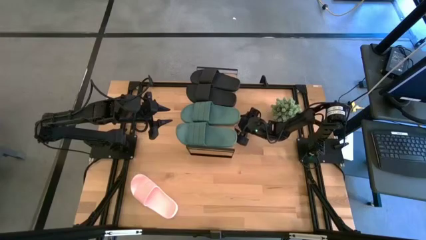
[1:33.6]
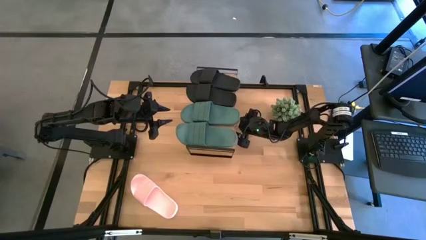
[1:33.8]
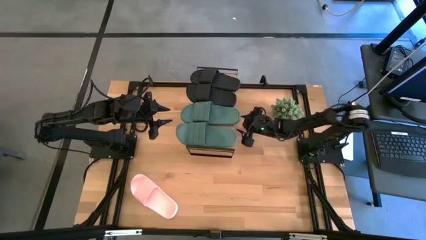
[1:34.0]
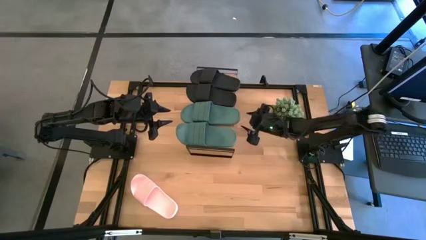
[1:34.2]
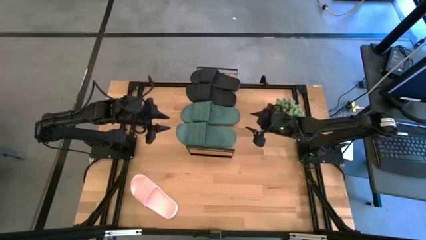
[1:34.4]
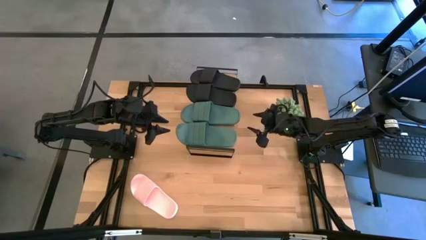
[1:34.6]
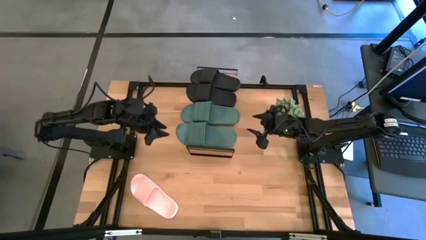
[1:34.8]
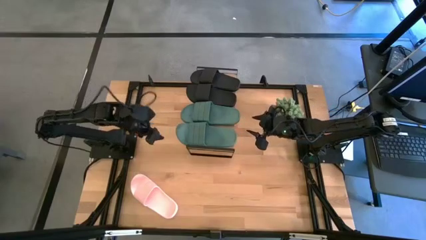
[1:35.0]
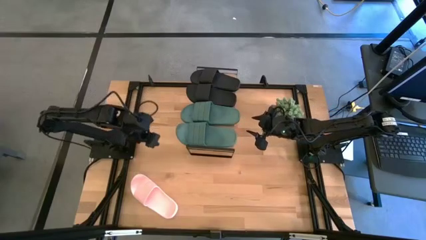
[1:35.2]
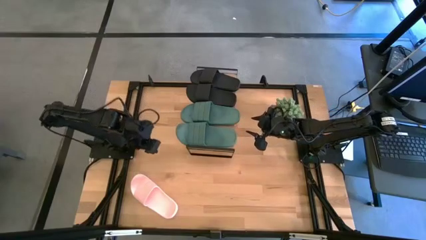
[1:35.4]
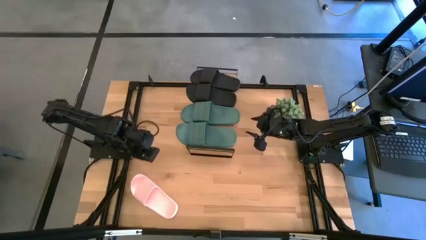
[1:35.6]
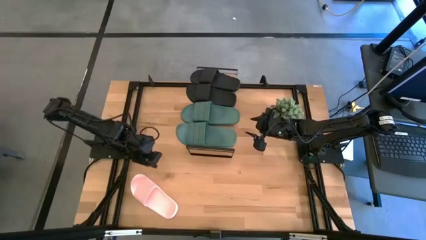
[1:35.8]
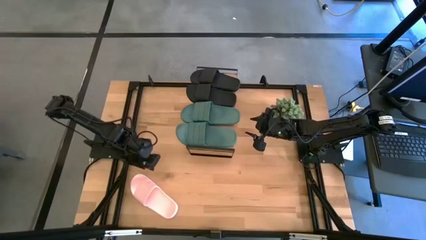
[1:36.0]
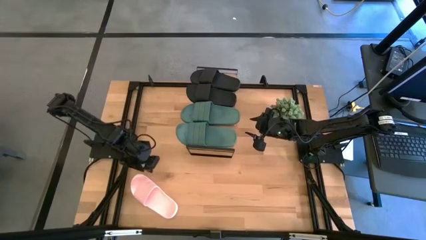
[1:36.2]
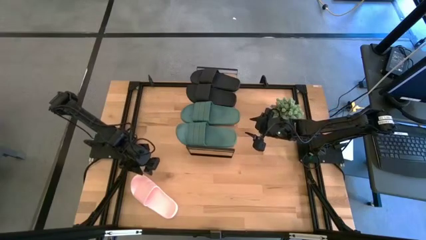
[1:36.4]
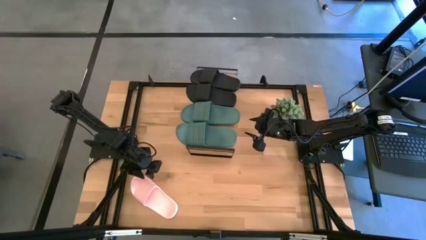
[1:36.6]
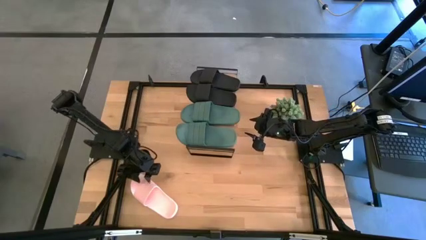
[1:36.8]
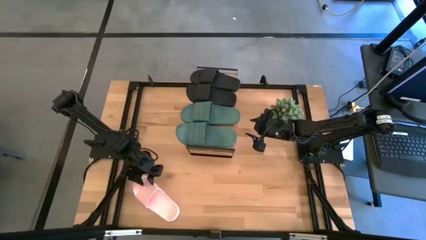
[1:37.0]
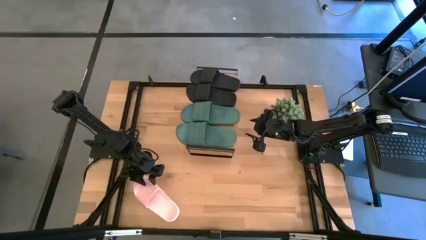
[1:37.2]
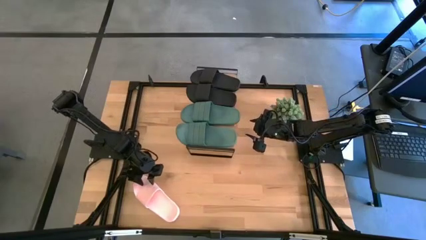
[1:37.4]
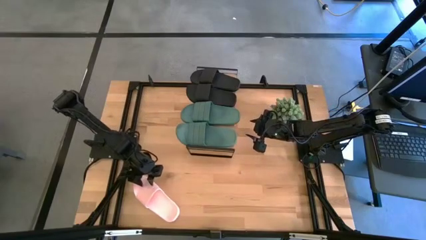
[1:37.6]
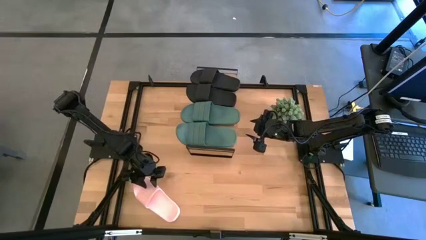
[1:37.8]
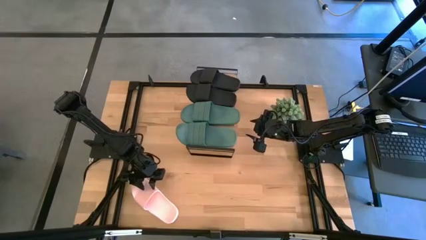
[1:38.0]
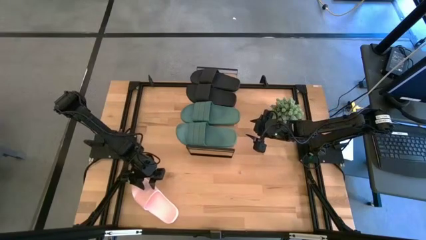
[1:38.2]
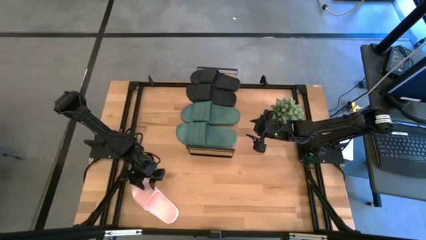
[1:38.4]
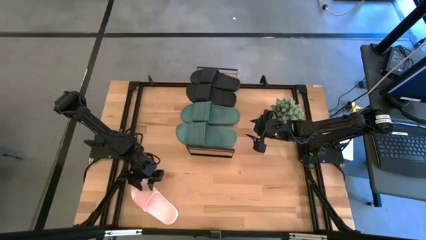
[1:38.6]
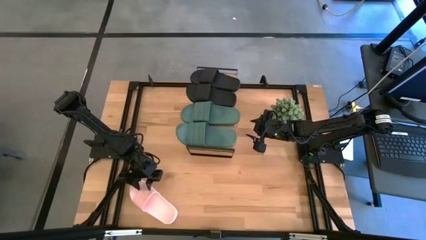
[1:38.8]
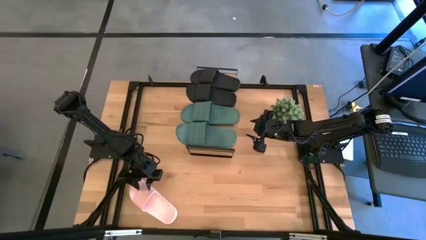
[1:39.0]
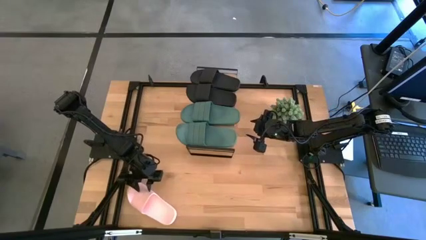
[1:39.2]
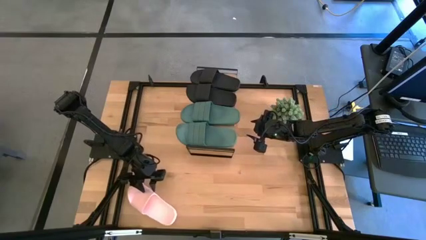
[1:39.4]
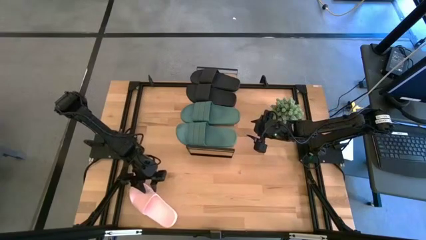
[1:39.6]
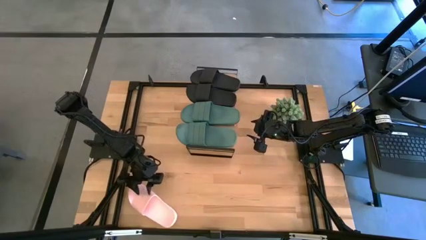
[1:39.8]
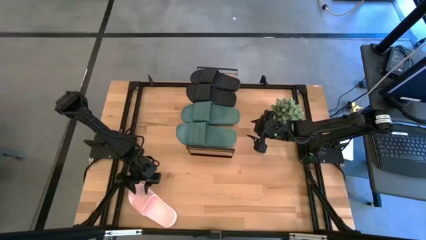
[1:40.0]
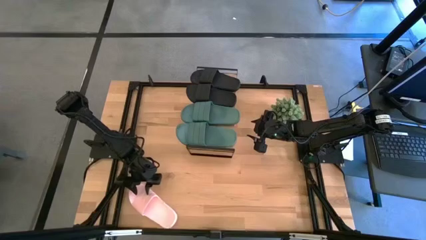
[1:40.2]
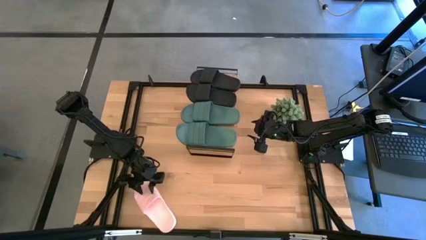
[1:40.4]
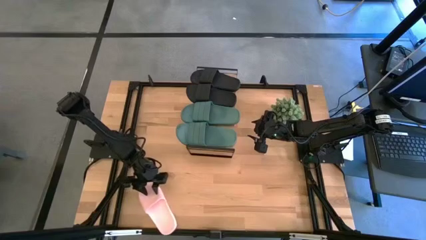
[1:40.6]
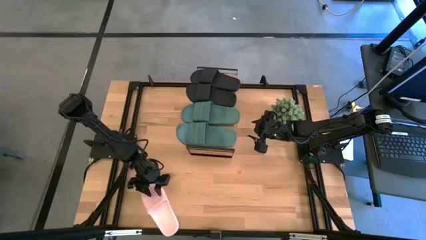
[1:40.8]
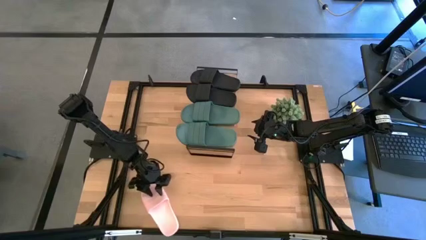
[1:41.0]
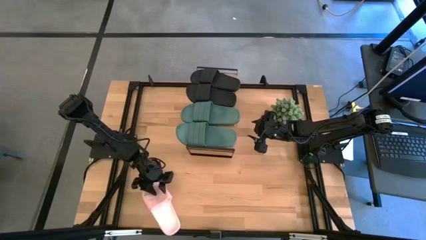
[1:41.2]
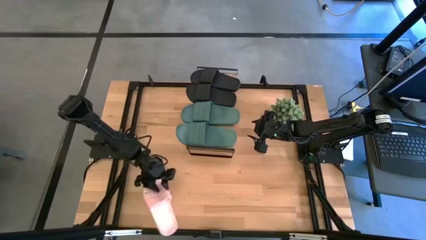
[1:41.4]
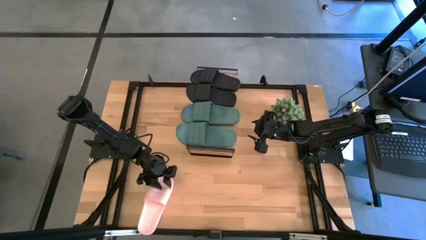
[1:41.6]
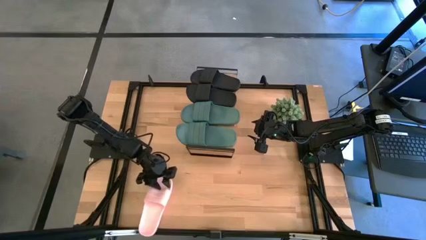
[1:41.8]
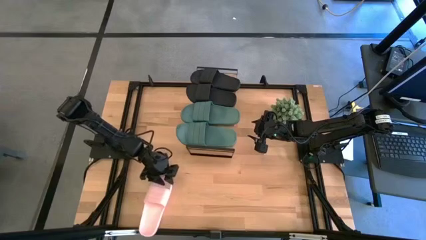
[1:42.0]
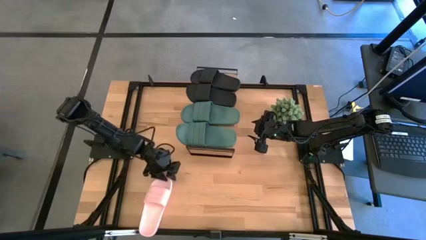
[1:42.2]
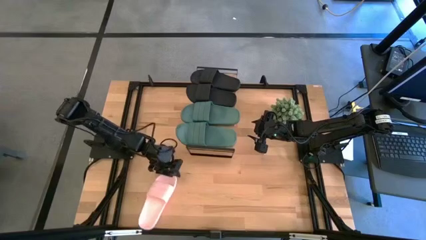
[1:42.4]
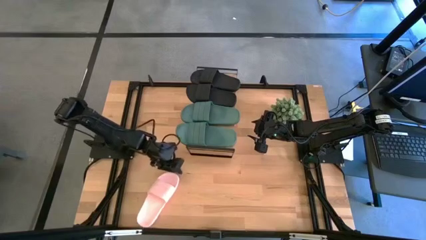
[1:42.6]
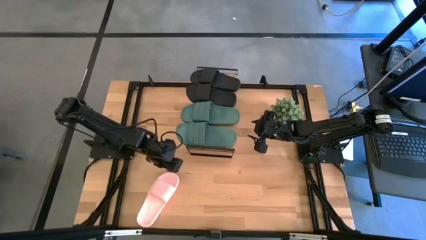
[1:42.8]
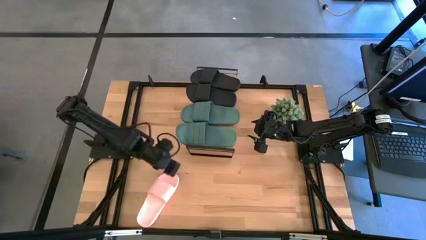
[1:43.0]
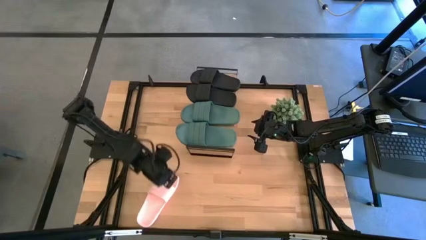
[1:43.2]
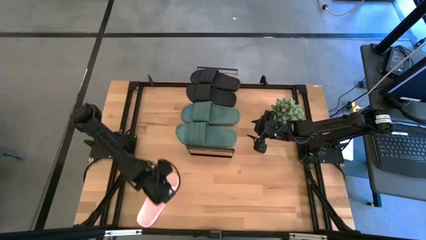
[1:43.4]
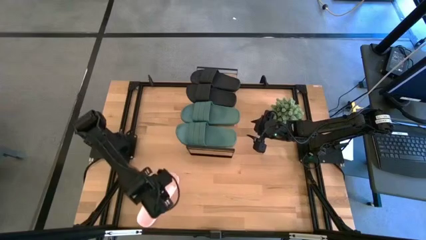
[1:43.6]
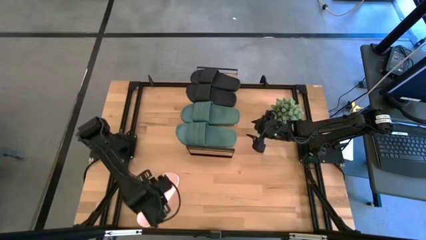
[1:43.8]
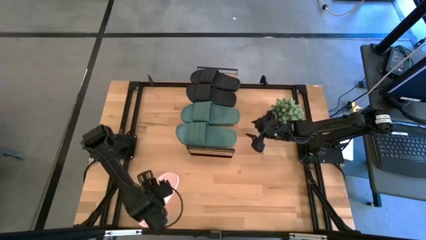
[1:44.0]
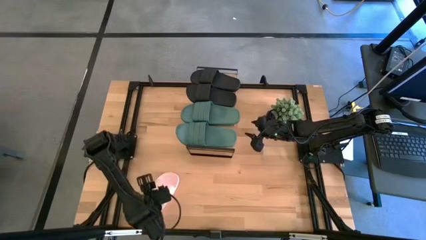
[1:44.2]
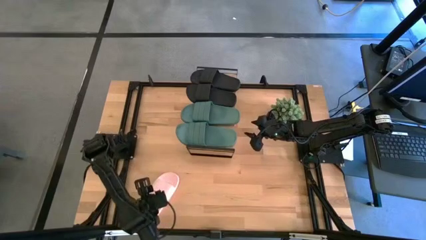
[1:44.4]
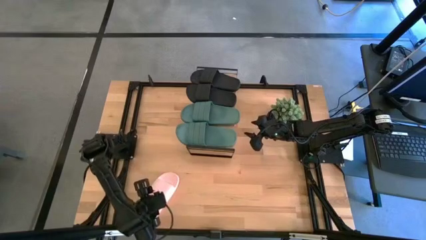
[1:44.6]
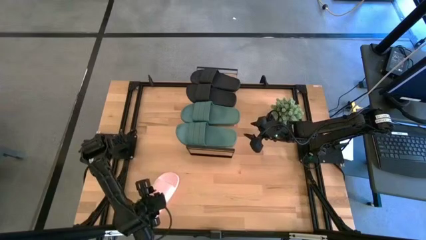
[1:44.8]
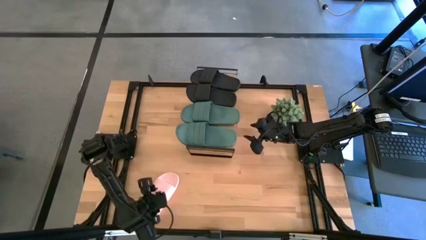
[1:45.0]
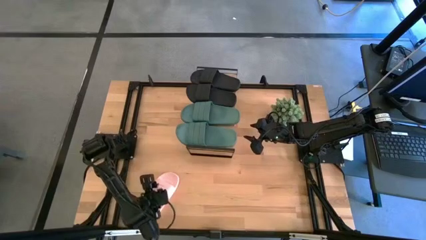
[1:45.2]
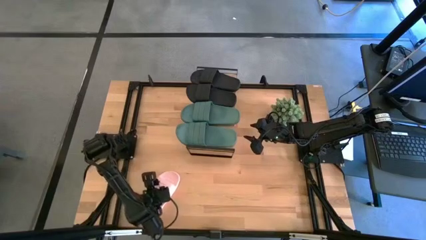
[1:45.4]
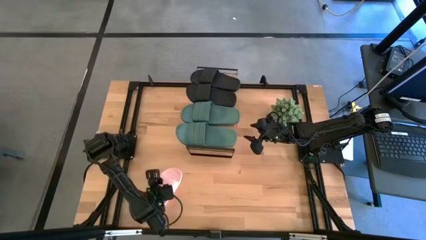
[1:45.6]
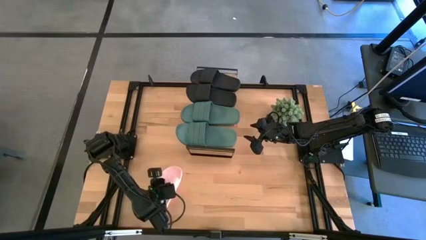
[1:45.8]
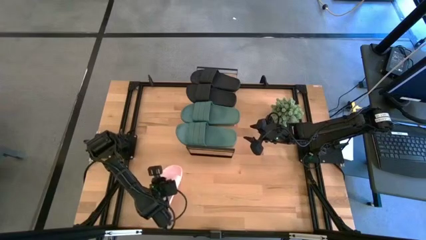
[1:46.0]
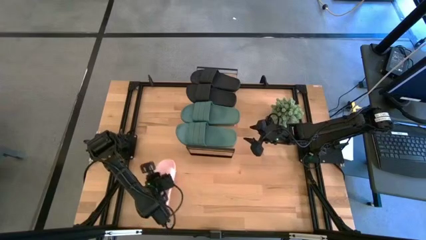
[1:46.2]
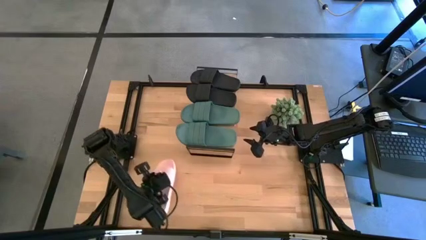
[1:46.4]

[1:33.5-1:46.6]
Task: Pick and place slides into the shelf
Put the pink slipper under the shelf

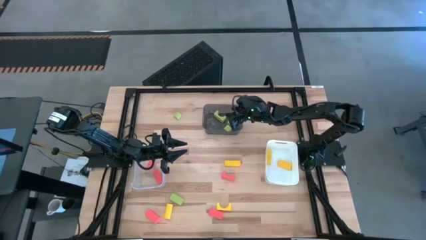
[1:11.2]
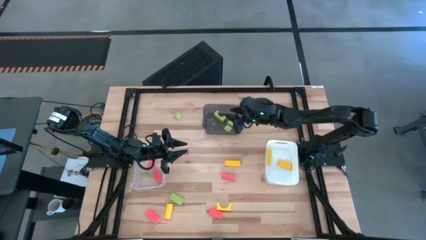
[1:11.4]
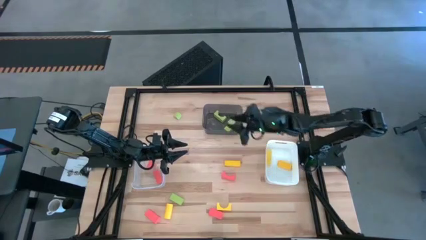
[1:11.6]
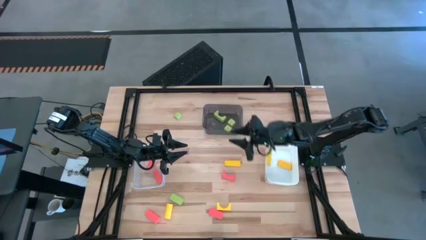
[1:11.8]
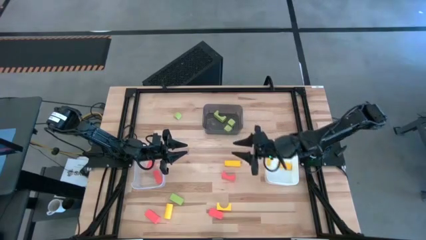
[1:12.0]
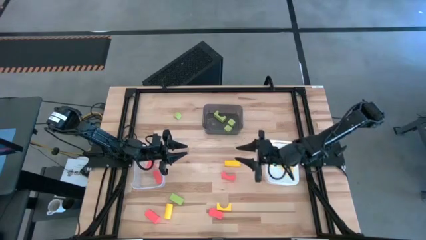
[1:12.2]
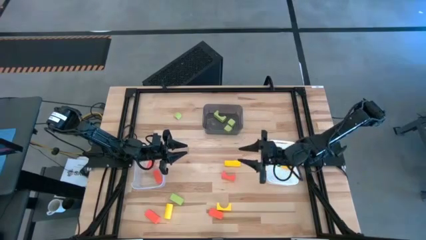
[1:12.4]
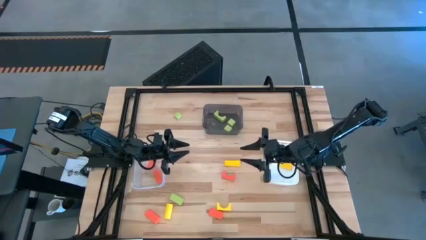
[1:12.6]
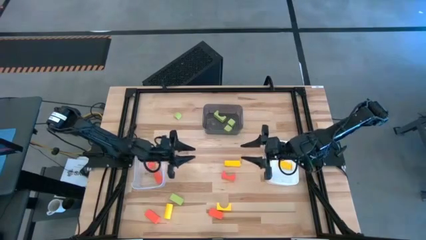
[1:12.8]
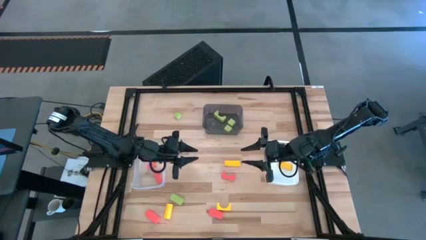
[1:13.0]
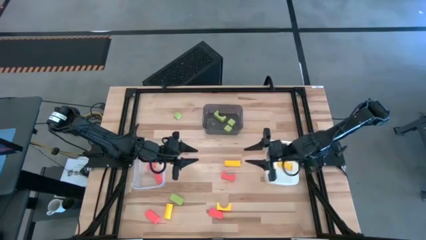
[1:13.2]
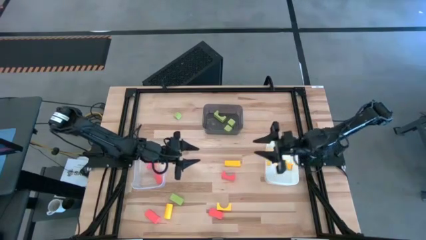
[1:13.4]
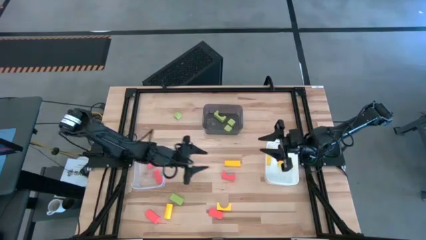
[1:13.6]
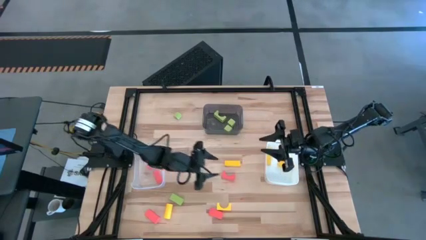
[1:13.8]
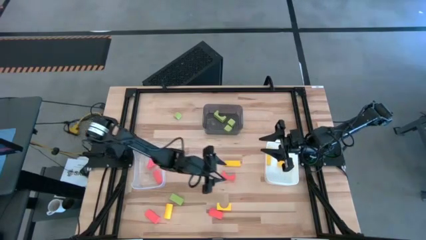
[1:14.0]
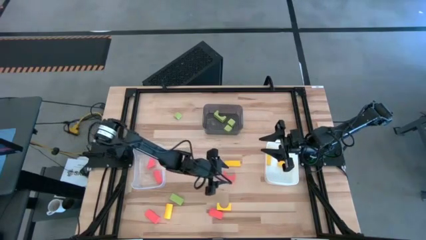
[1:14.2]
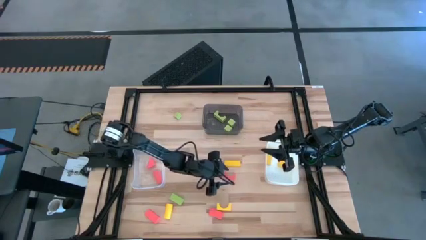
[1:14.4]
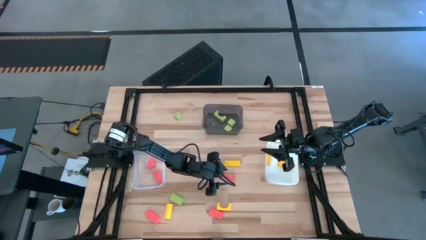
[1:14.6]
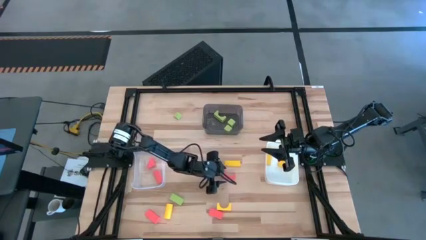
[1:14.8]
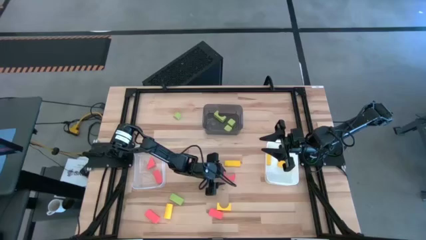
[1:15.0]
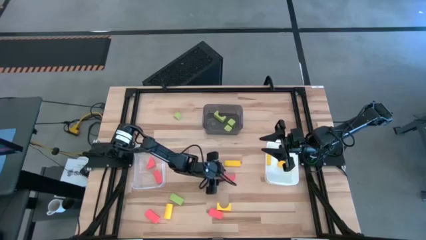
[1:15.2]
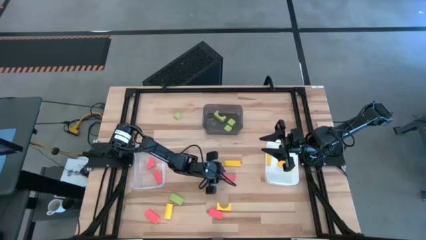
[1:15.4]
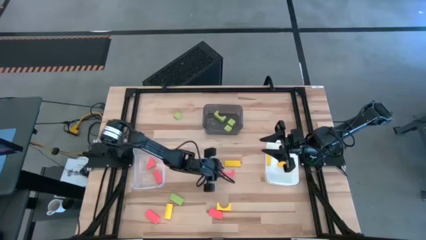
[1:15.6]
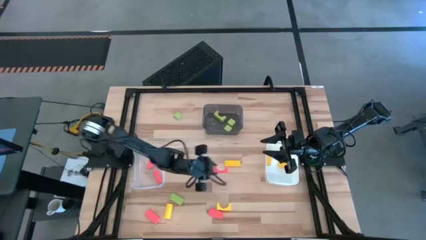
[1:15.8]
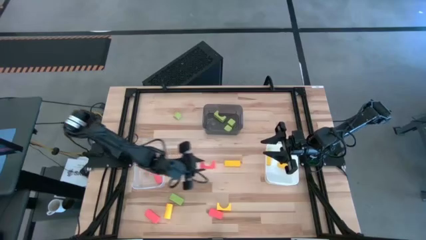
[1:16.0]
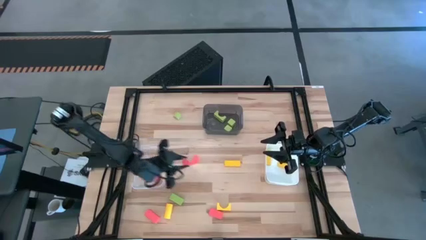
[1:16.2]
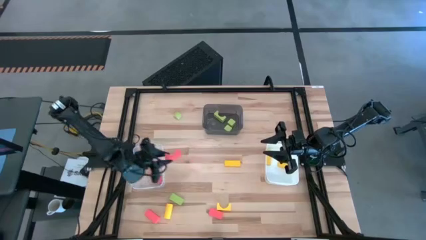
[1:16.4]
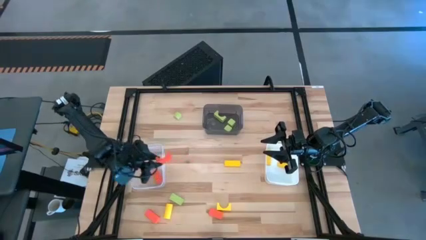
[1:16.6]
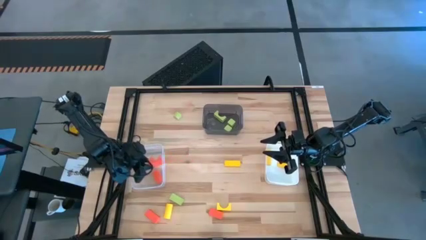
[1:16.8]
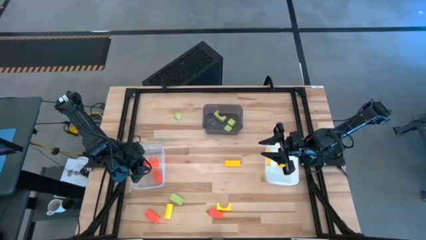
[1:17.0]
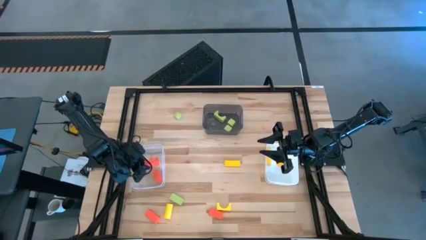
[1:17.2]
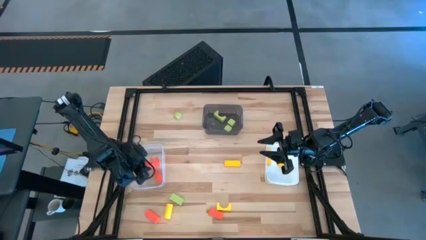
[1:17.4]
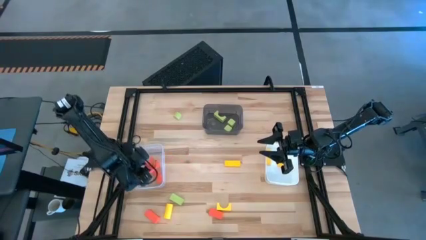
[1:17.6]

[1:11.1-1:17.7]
Task: Sort & place blocks by color
Put the orange block into the transparent bin
